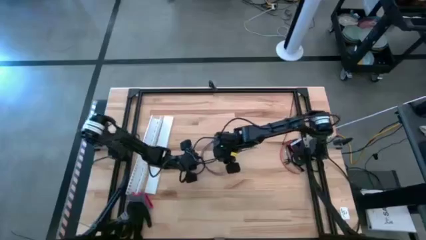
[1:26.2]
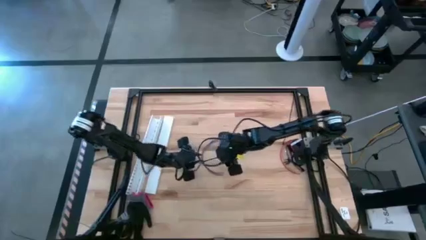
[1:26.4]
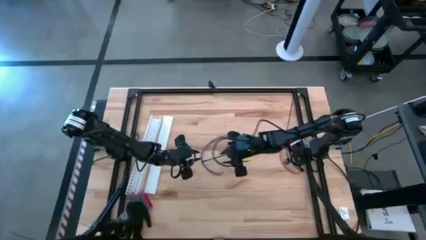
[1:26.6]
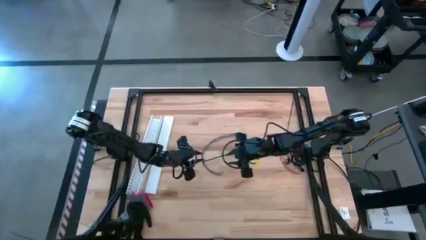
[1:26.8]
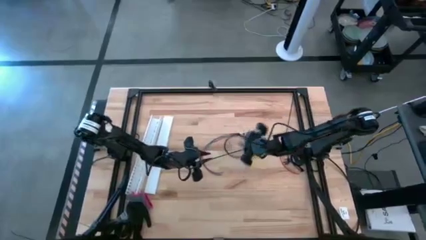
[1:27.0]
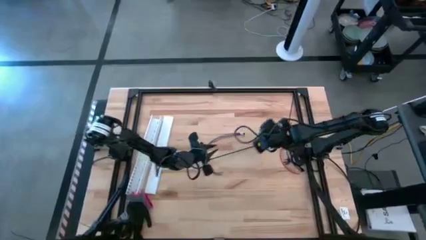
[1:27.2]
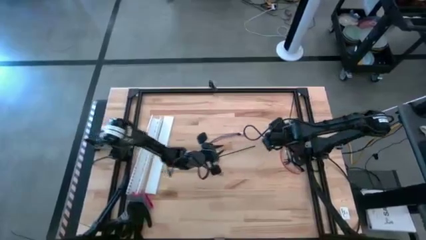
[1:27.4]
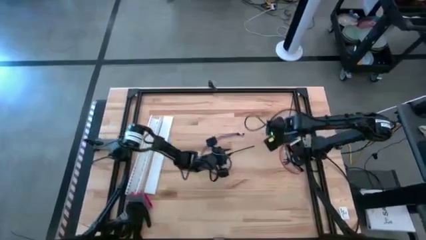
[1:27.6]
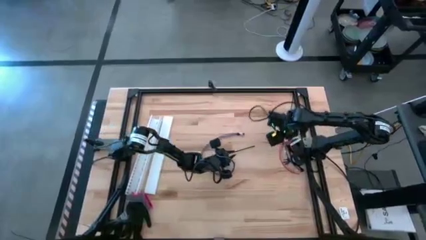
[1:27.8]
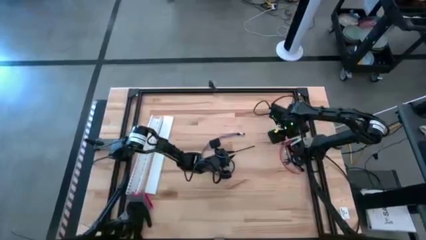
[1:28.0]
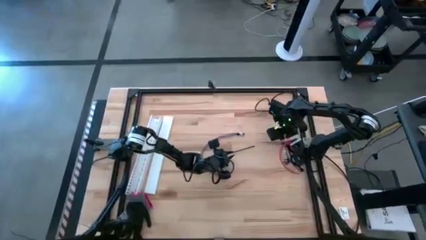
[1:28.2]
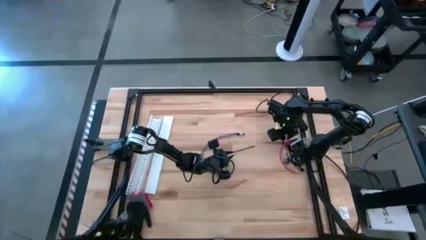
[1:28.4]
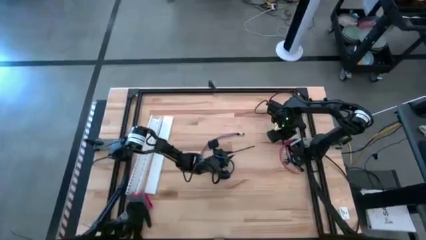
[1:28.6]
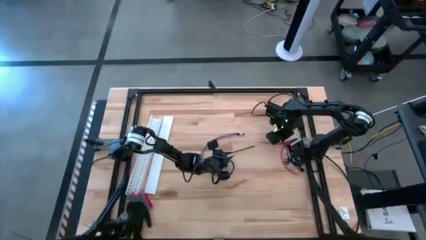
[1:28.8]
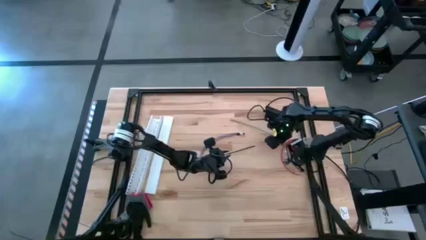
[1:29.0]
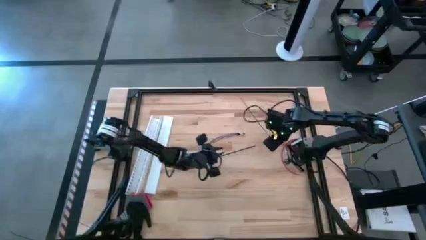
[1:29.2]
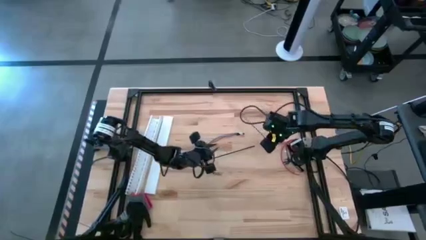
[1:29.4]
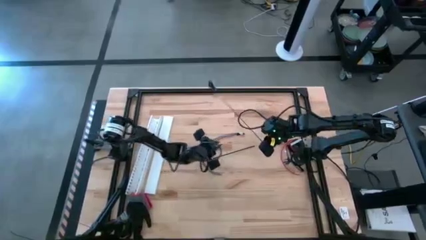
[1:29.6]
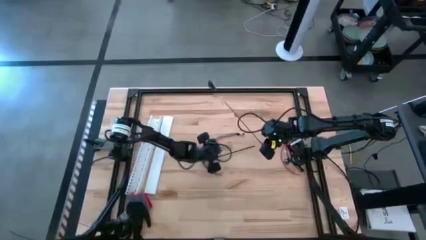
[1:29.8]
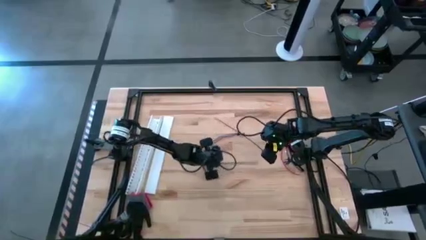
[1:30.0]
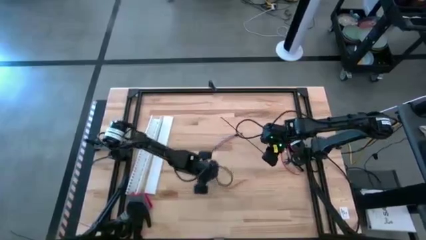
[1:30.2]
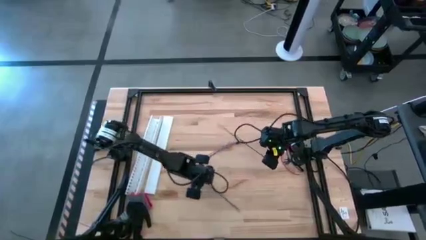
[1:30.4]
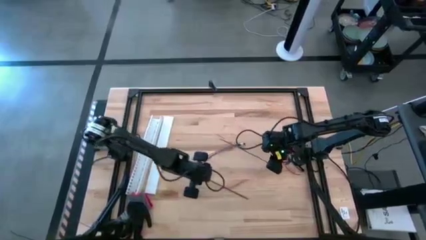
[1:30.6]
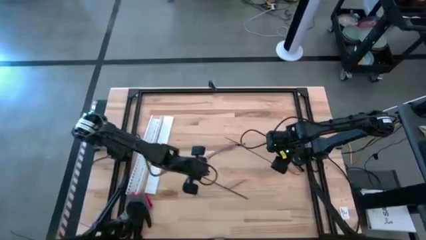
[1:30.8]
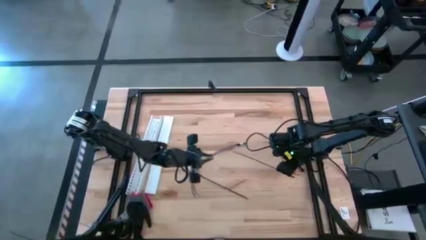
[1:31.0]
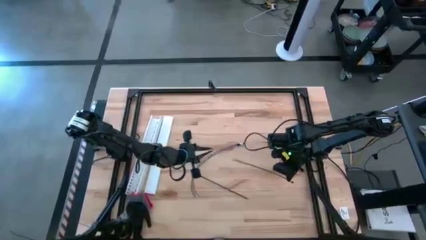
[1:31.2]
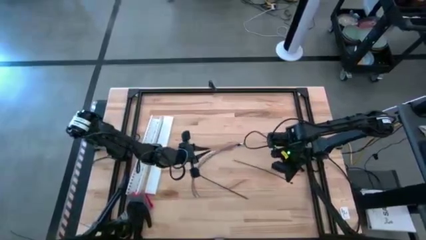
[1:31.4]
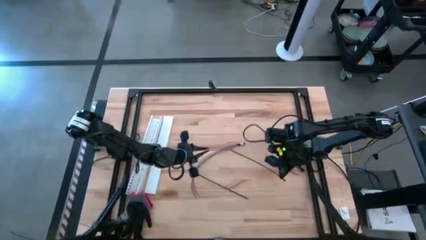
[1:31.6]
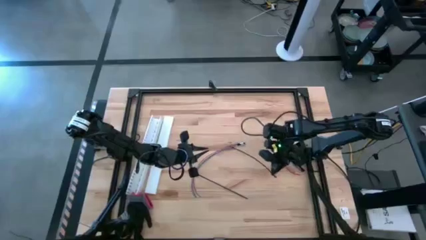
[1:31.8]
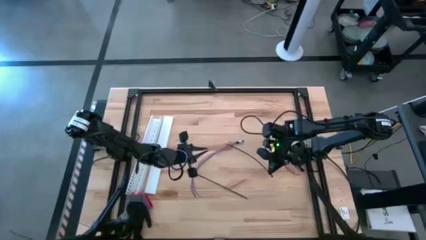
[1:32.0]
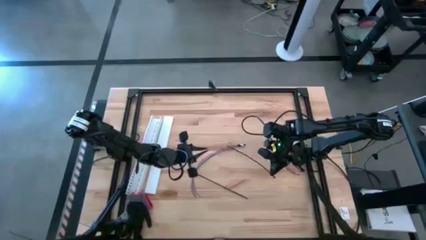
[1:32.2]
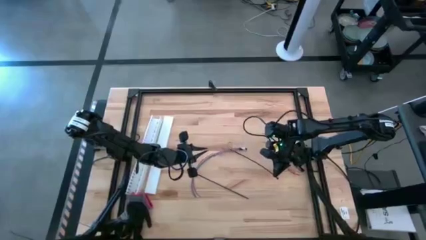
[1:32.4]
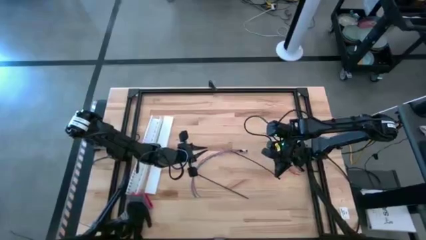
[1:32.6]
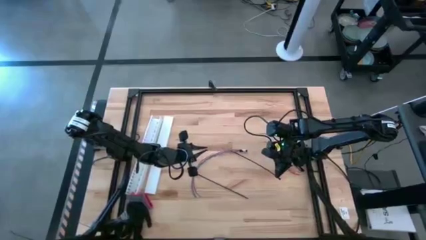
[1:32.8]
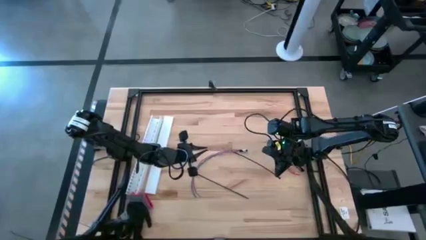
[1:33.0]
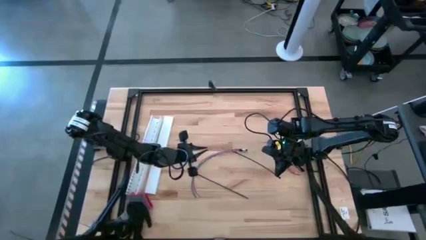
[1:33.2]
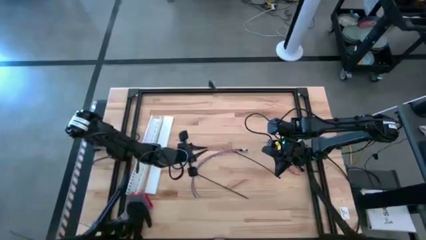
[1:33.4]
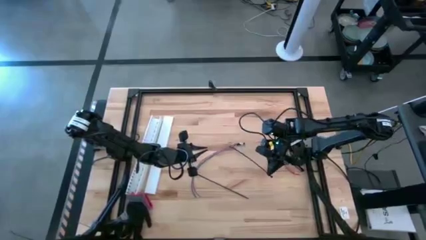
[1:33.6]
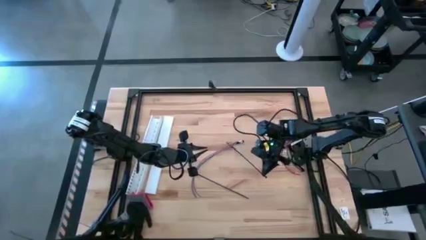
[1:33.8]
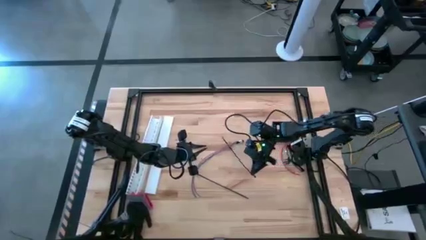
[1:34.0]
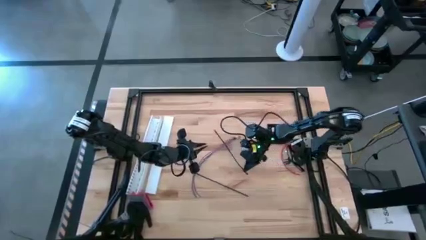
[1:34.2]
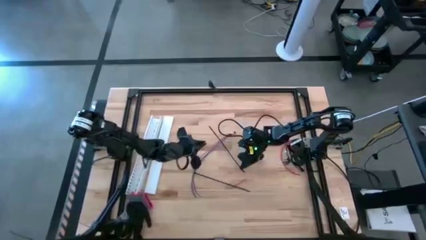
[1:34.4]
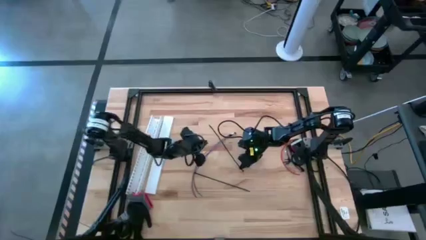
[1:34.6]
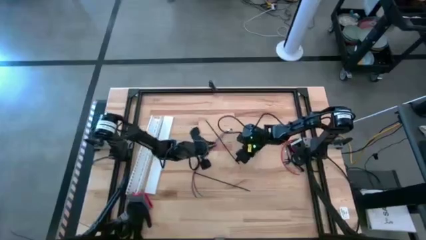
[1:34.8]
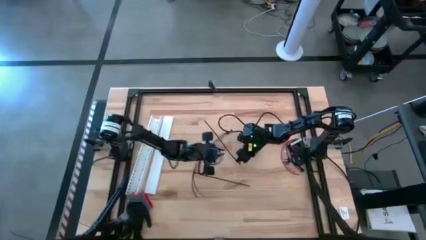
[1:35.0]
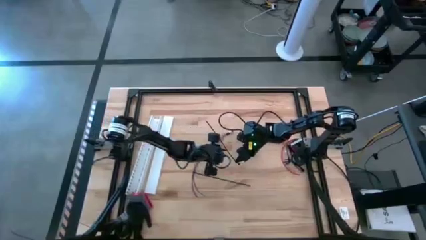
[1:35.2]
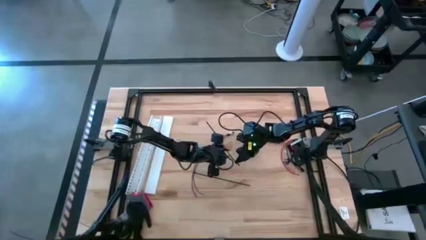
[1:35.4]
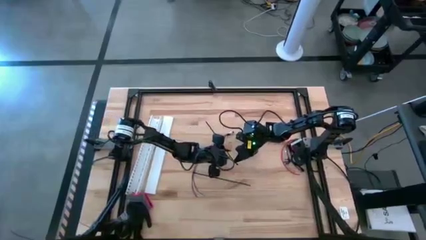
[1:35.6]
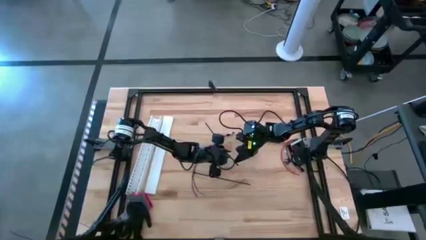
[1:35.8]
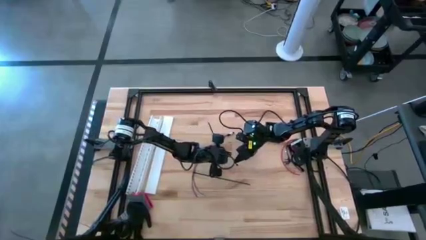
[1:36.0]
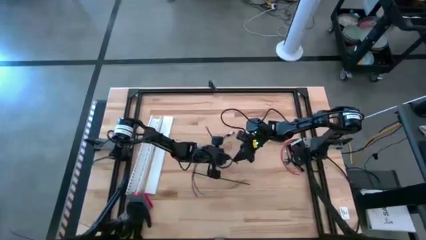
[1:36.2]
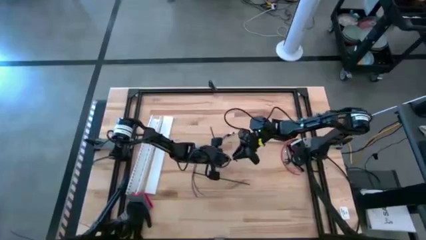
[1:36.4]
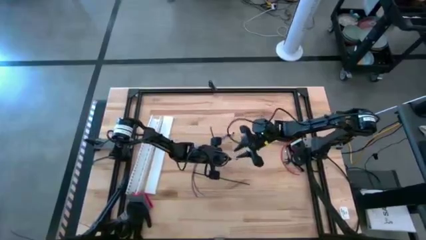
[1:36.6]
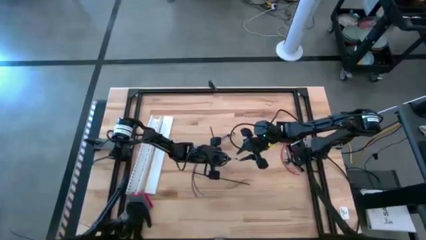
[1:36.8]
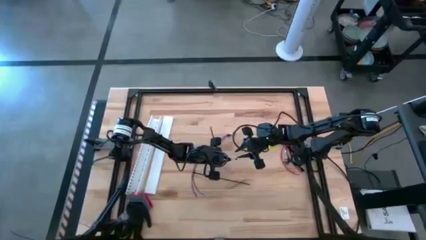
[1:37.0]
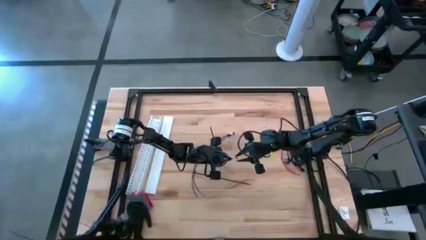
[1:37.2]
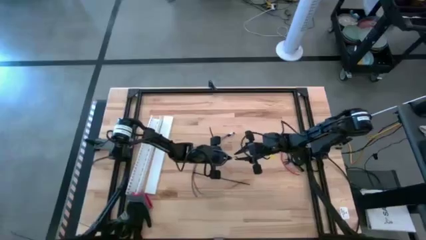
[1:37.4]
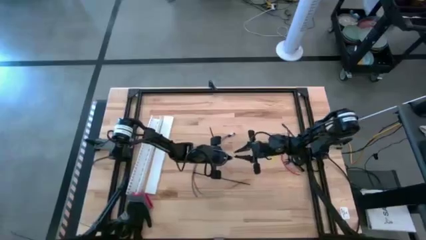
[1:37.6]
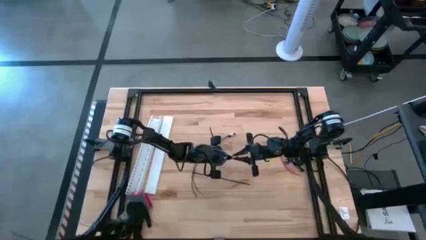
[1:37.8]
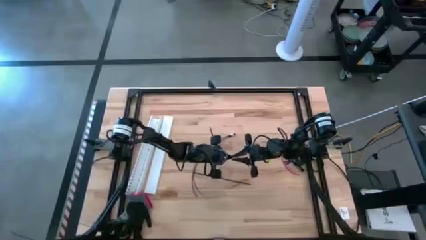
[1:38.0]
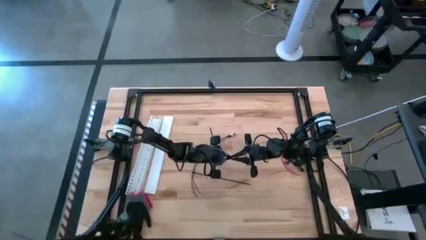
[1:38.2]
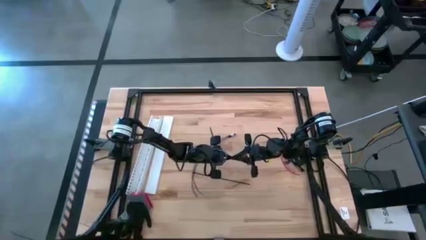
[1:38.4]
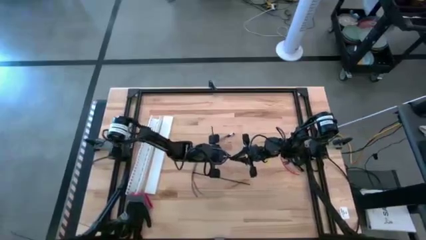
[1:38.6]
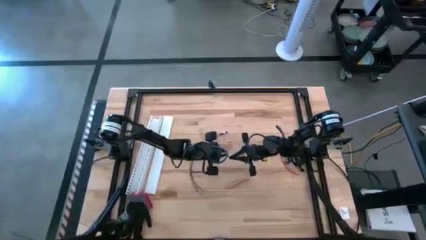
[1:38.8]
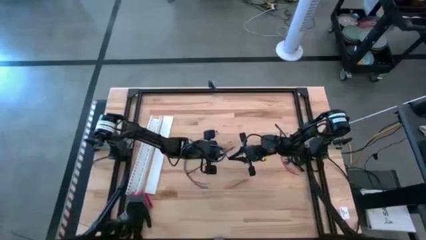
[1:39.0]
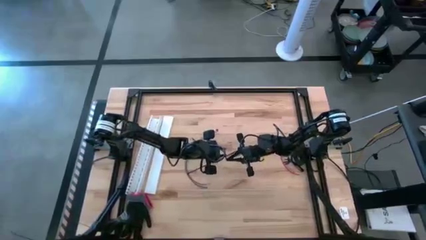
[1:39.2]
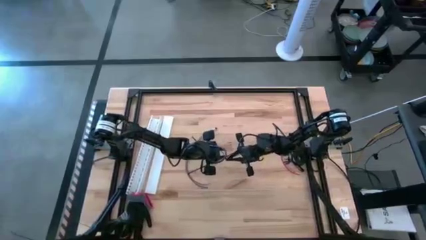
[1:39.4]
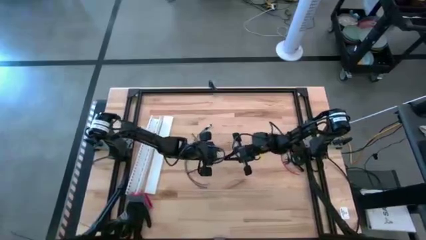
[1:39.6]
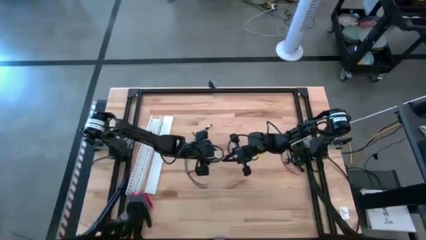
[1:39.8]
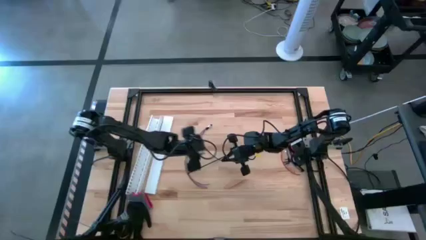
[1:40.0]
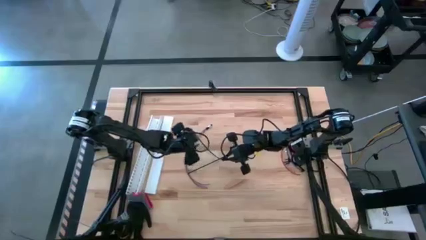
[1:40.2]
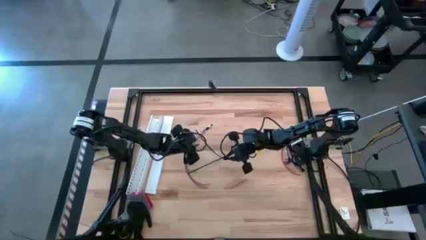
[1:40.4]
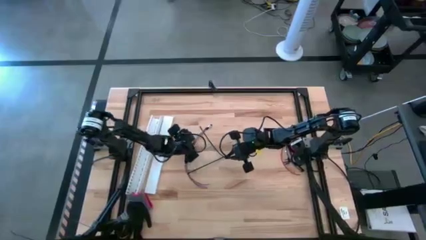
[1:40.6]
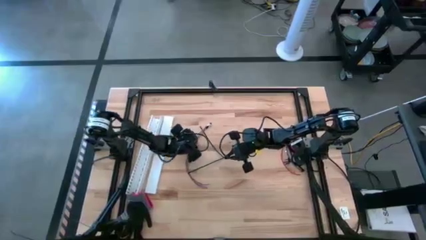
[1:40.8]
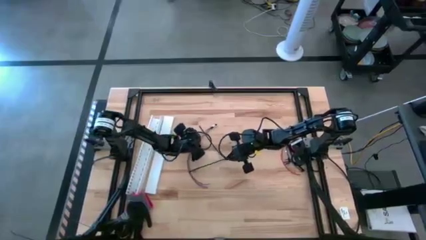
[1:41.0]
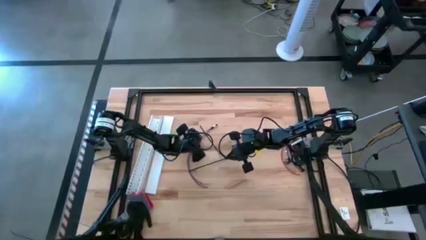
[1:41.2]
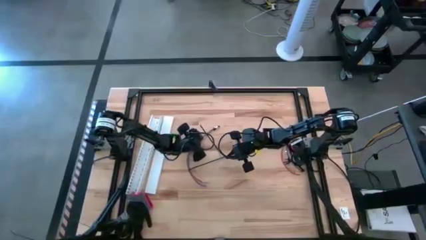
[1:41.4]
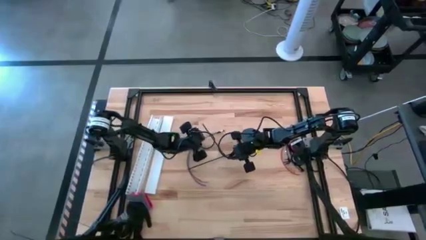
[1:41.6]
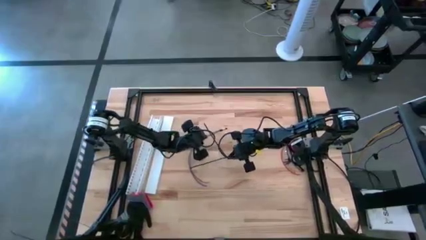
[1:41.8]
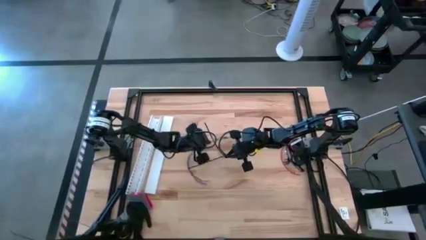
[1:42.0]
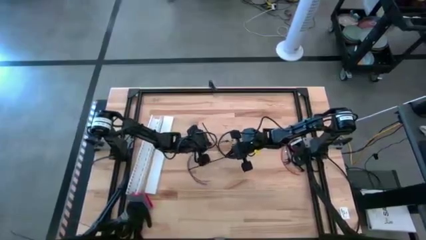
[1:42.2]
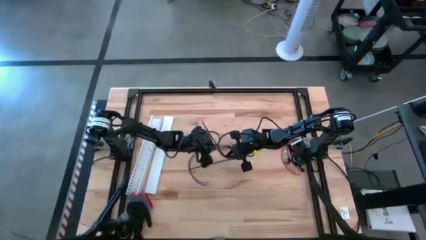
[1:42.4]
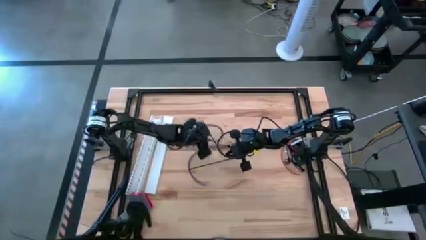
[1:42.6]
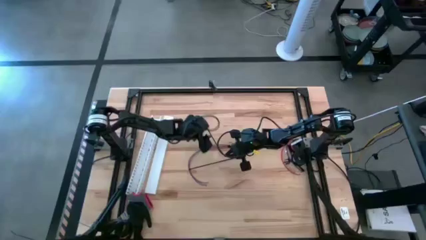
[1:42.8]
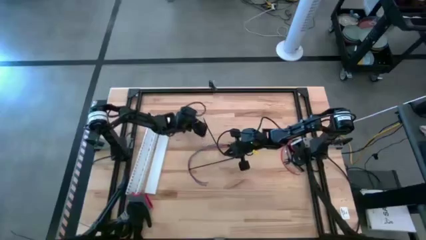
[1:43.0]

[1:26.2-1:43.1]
Task: Ziptie cables
Wrap the cable wires using black ziptie
